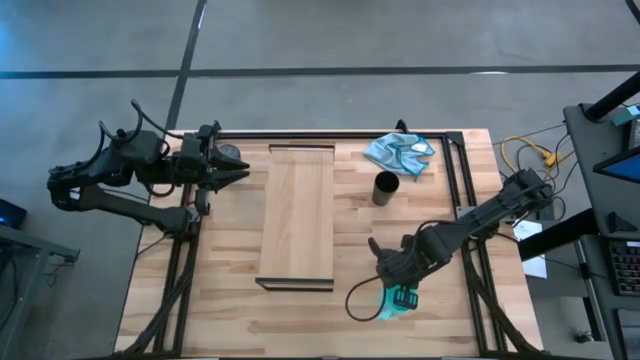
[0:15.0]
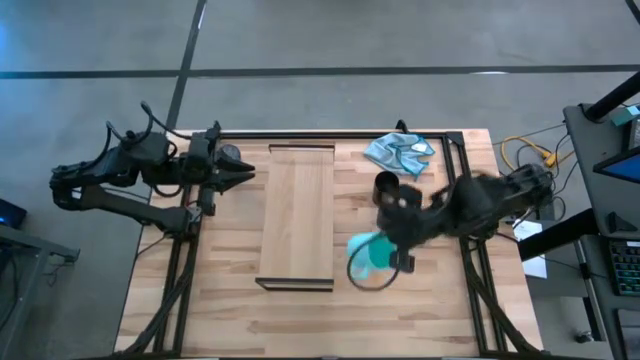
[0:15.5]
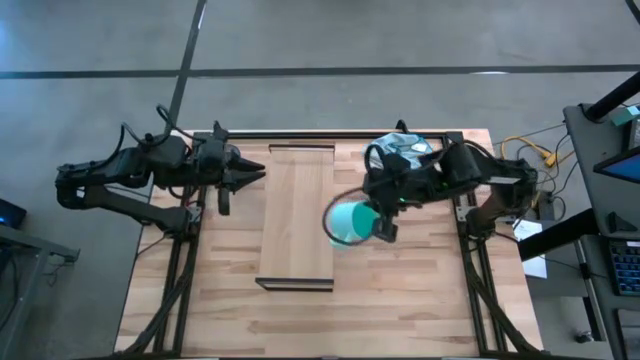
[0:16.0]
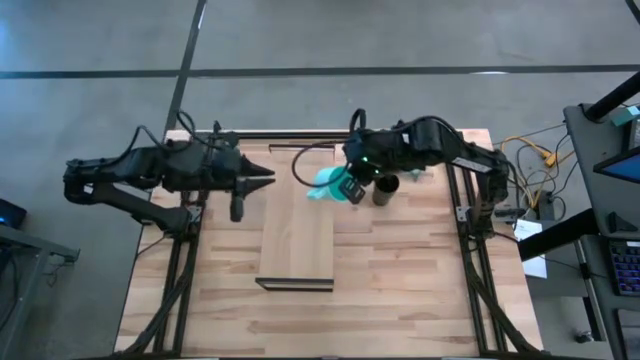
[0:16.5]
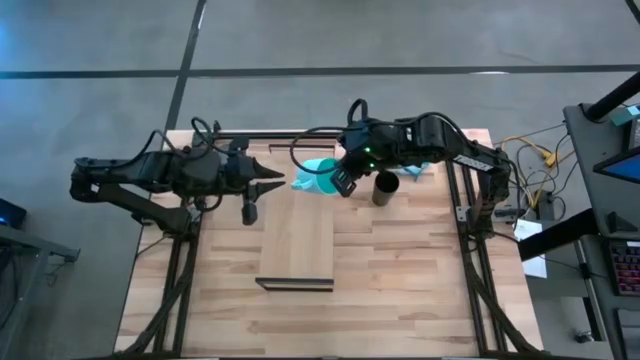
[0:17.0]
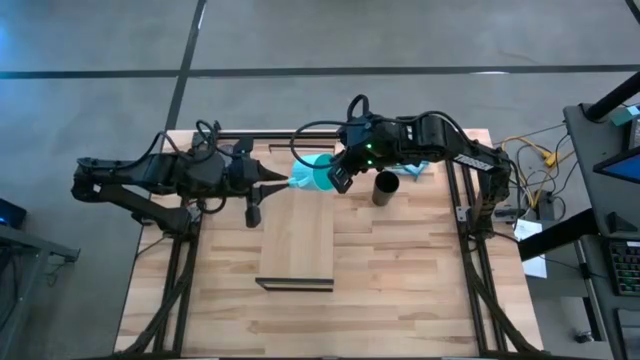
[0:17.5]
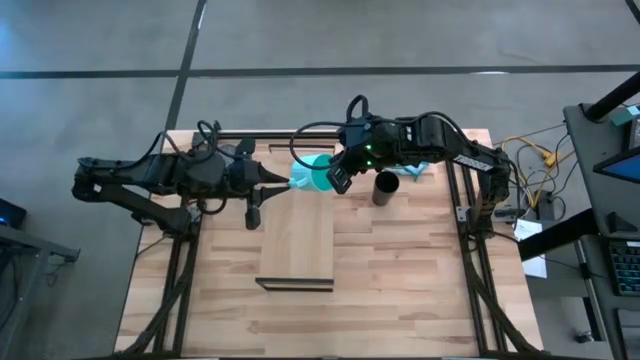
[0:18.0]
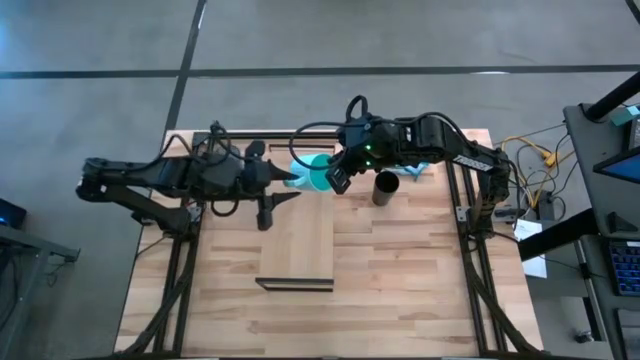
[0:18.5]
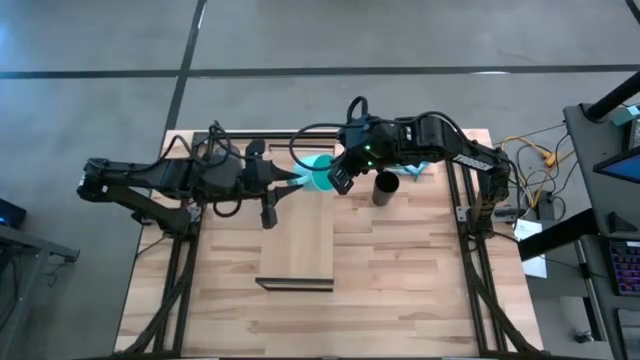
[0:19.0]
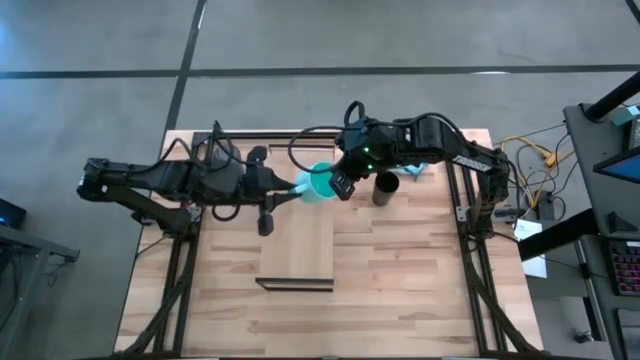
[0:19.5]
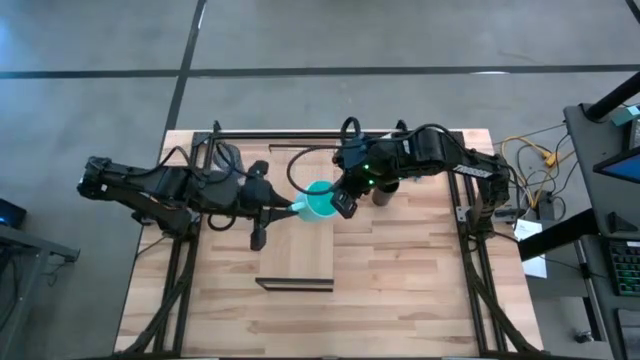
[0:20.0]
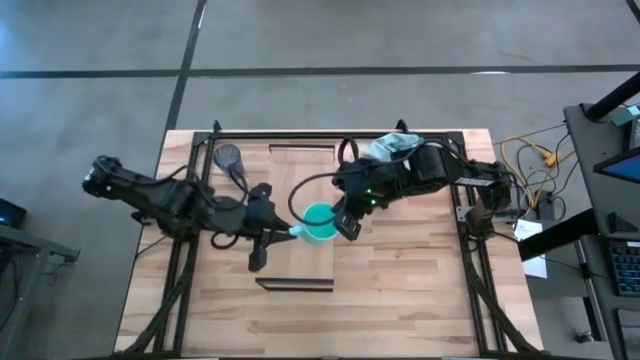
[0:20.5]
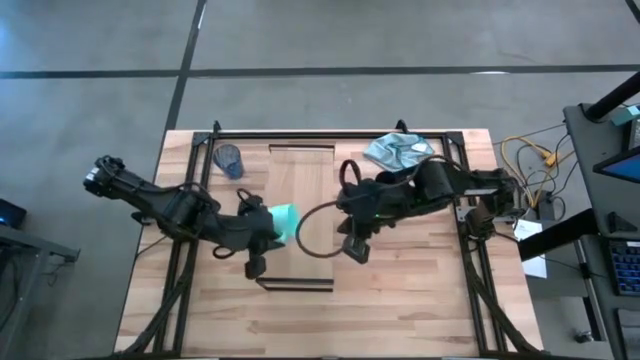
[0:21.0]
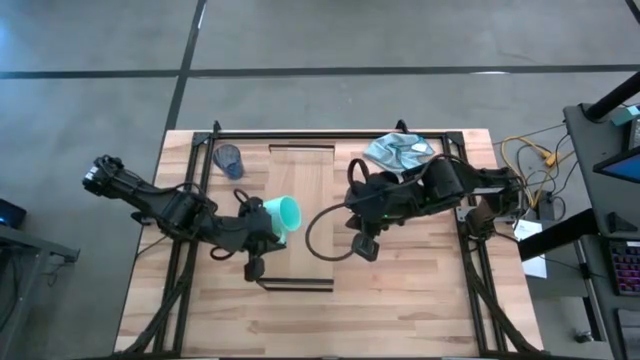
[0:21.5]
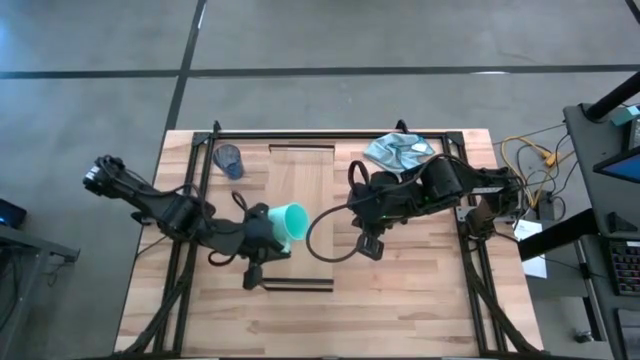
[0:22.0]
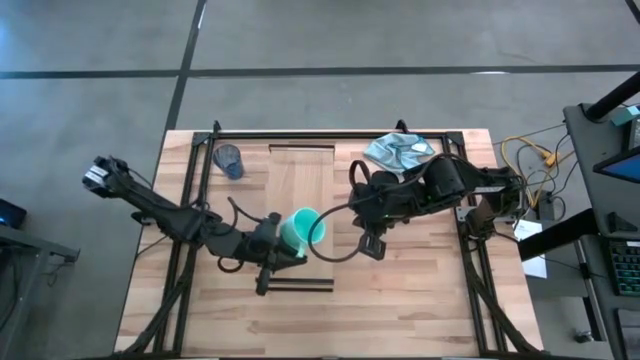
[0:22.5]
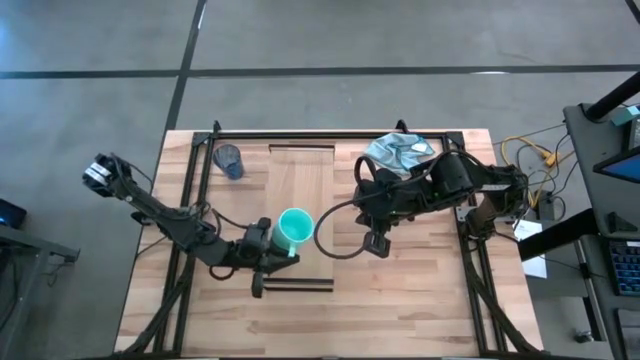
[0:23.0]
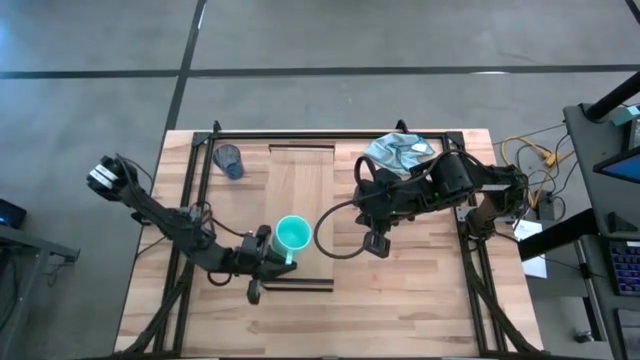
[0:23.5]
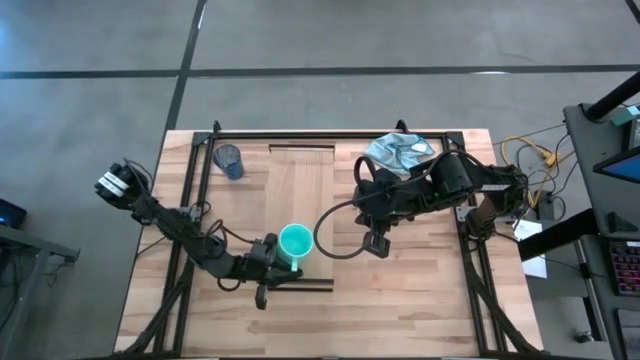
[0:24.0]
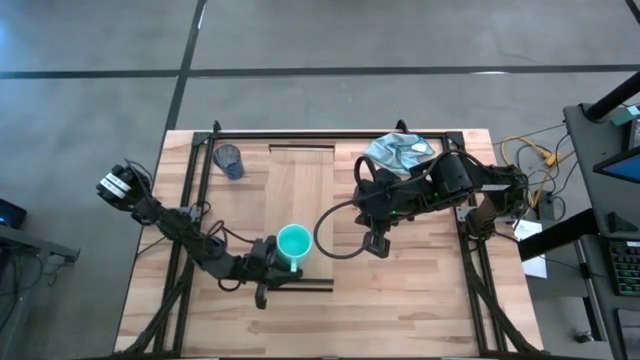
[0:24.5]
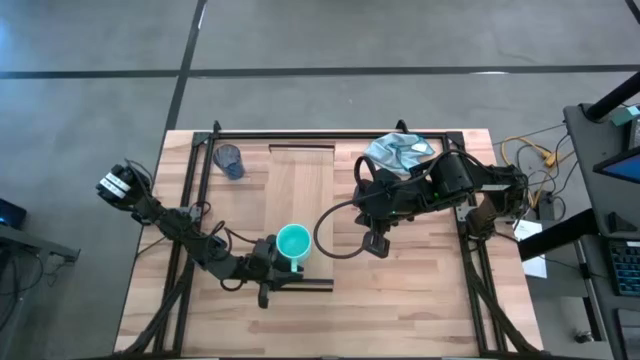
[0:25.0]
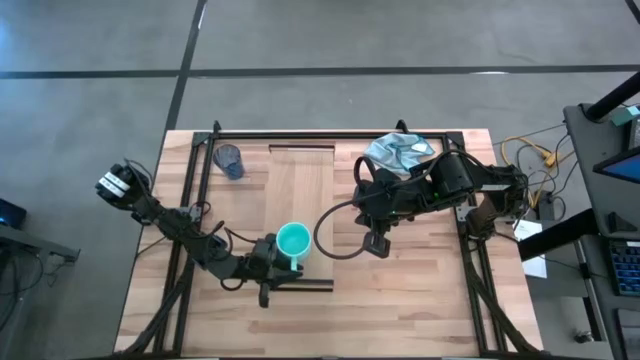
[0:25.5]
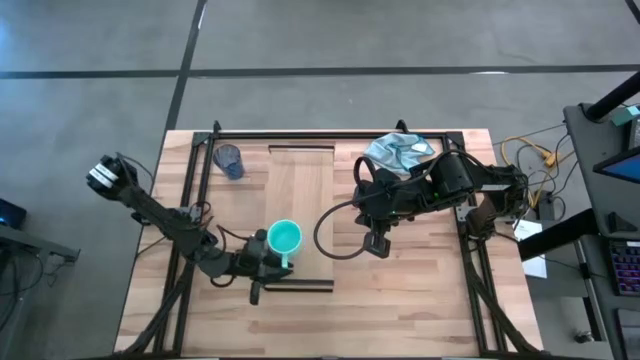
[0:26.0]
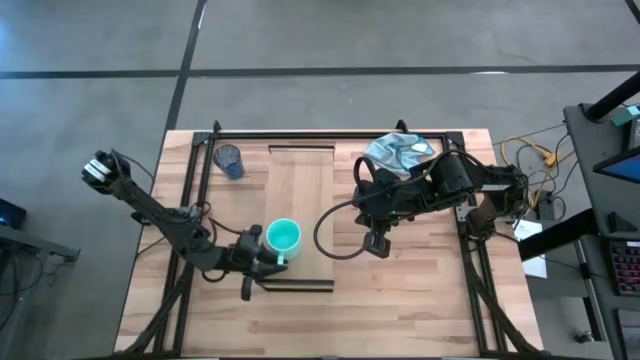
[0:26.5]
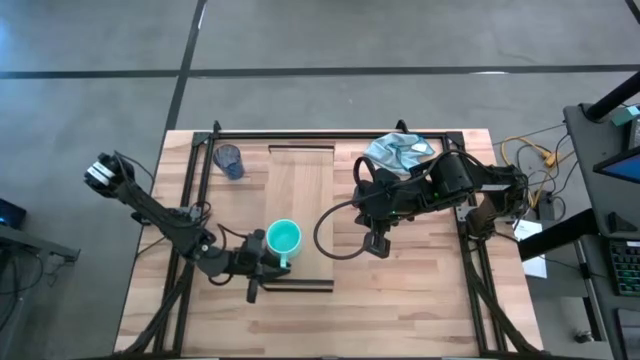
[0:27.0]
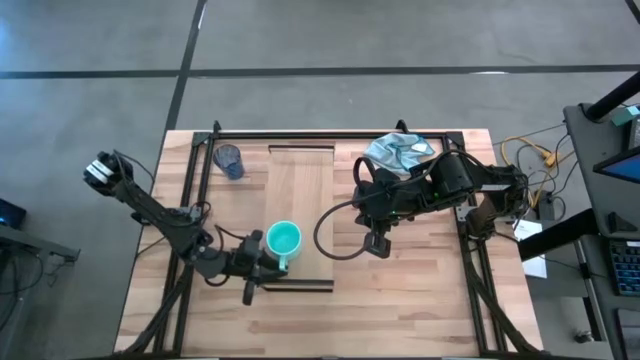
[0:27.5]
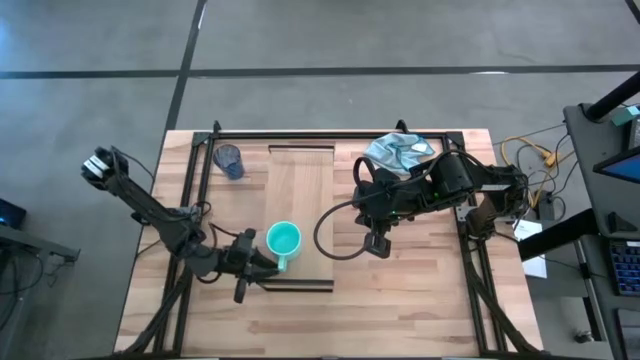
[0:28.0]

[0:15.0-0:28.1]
Task: Stack small to large cups/mugs on shelf
Put the blue mug on the shelf

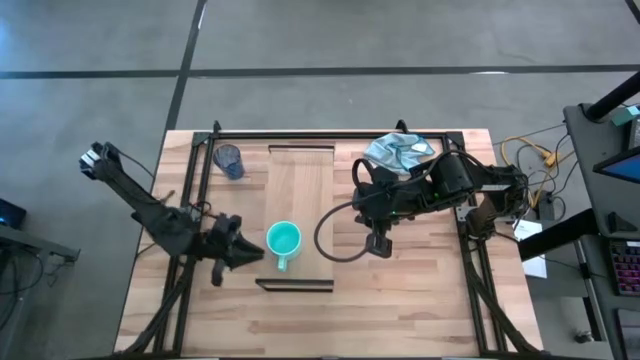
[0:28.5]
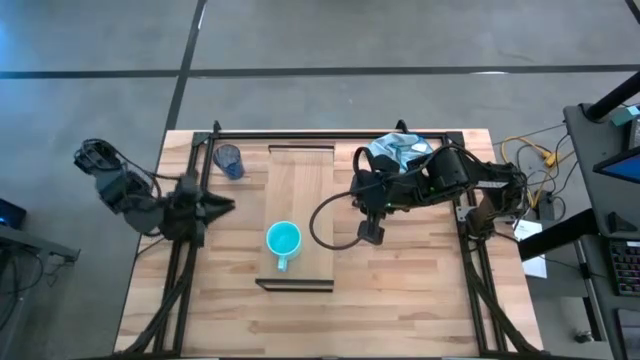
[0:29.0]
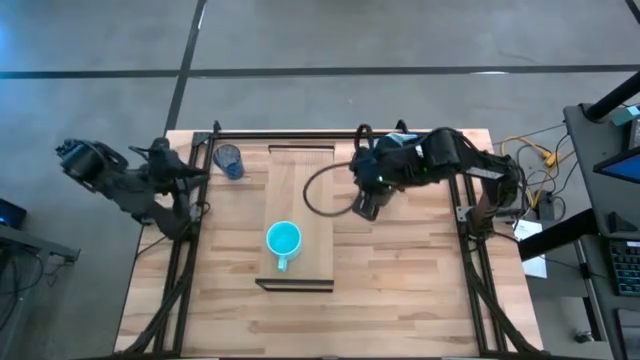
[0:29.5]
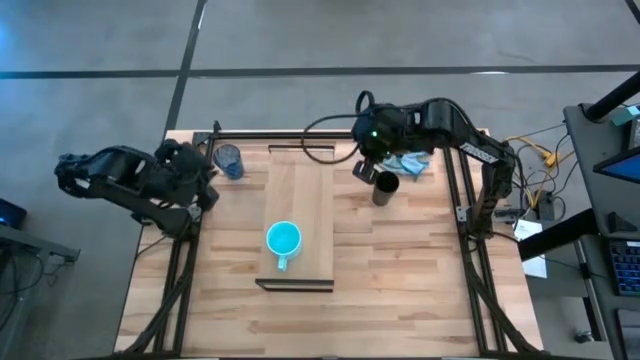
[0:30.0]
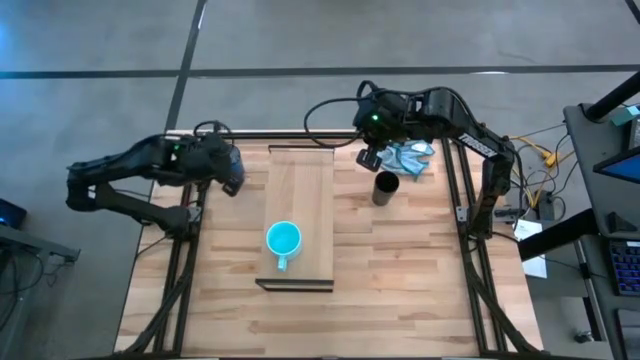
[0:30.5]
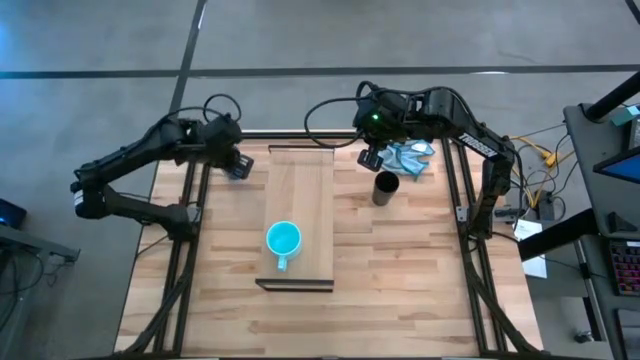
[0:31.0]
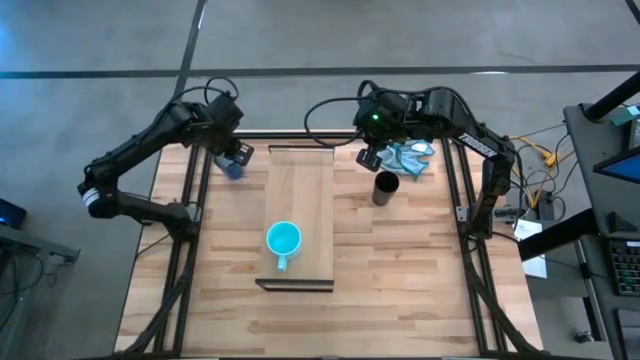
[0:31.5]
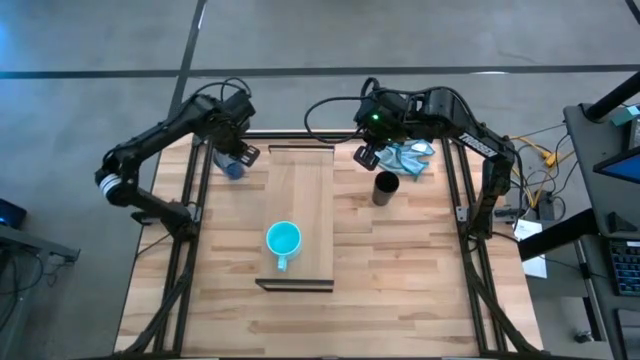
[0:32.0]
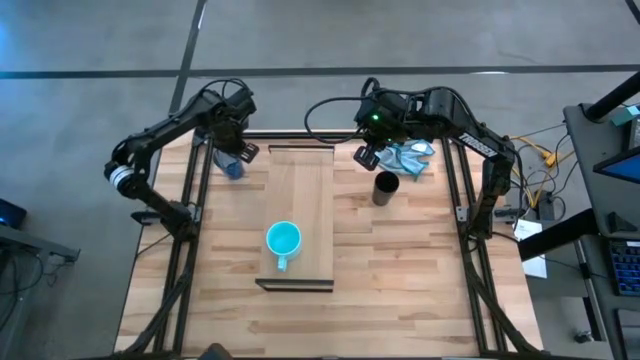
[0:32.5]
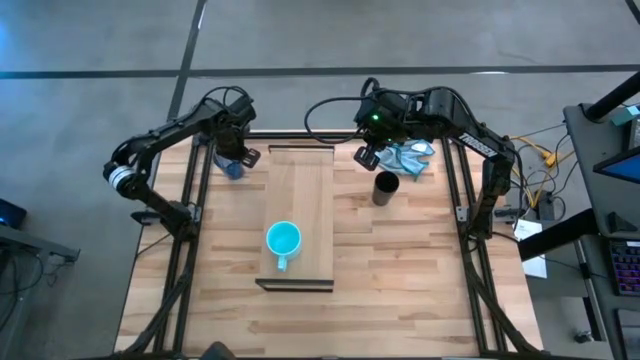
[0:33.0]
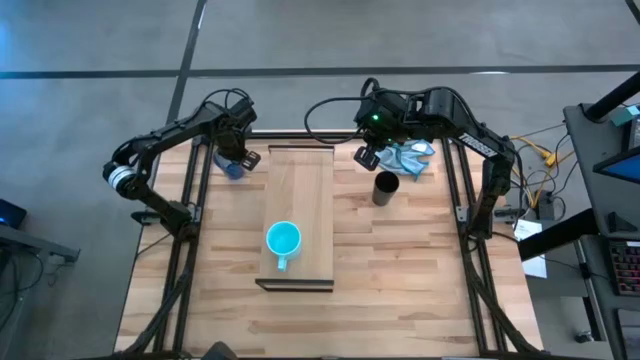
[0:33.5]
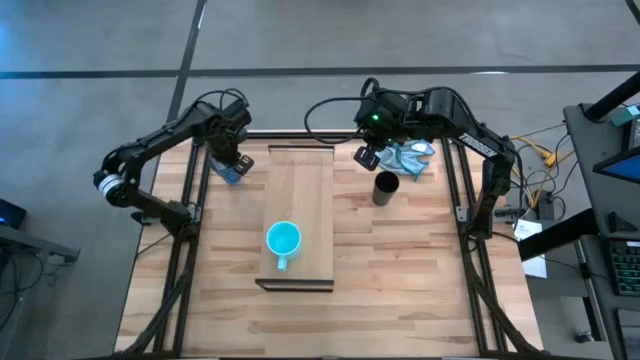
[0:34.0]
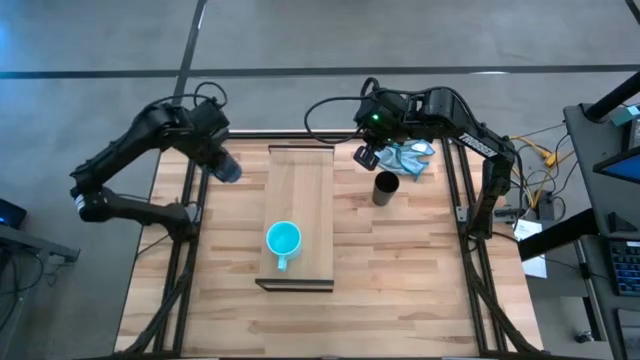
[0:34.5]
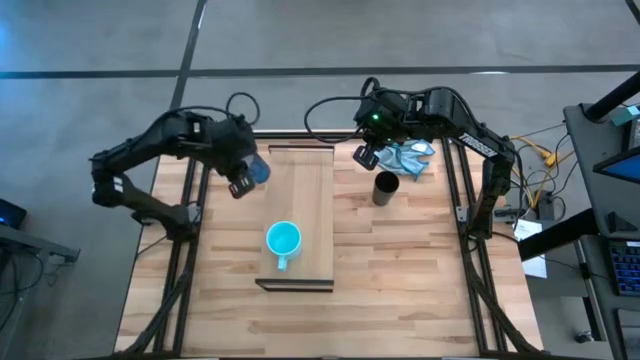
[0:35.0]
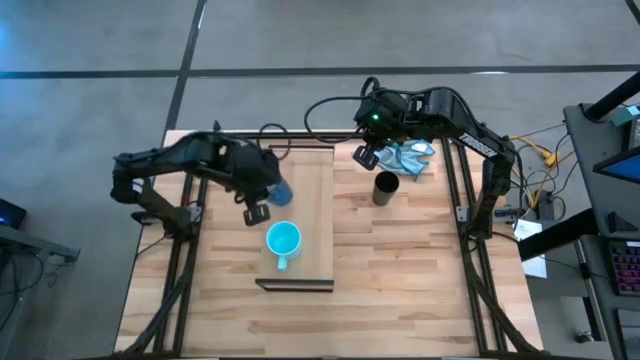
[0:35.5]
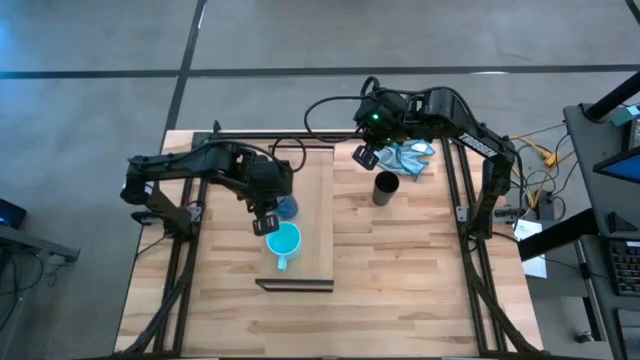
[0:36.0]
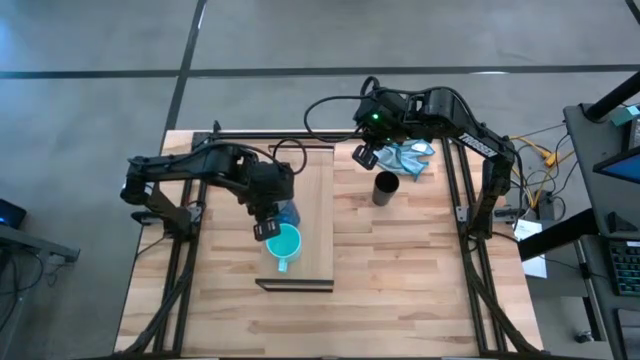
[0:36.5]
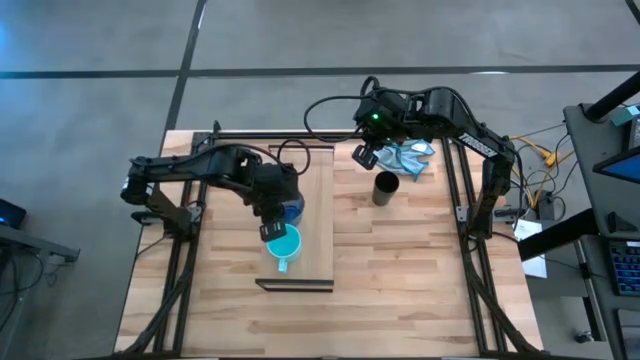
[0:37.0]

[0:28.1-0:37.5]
Put the blue cup on the shelf

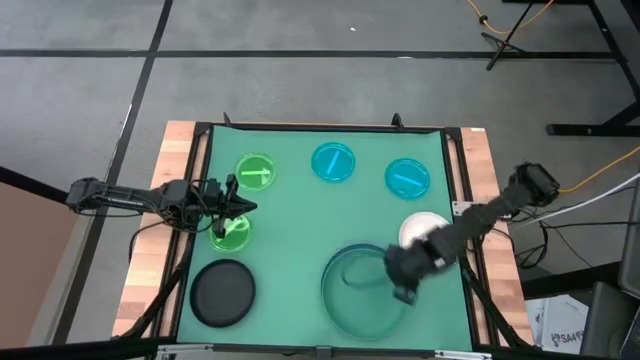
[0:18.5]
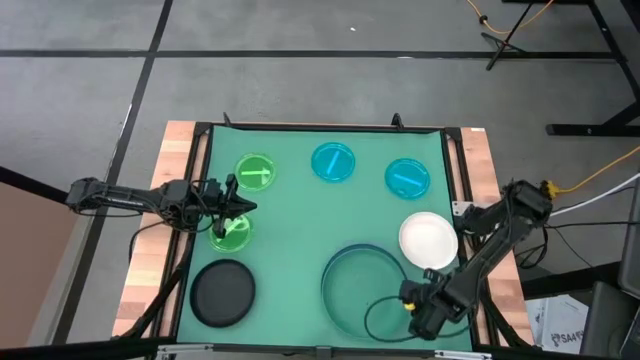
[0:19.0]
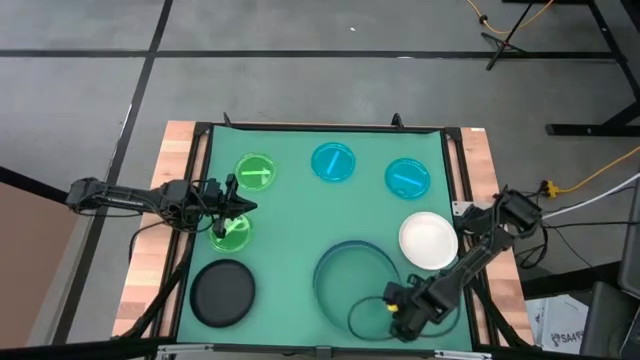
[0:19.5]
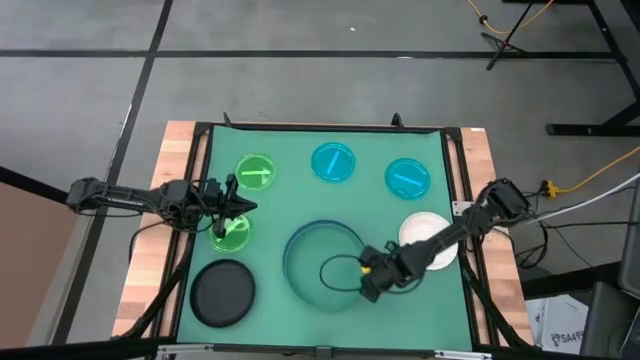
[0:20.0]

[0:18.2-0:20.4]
Task: Stack plastic plates
Move the stacked plates to the center of the table
